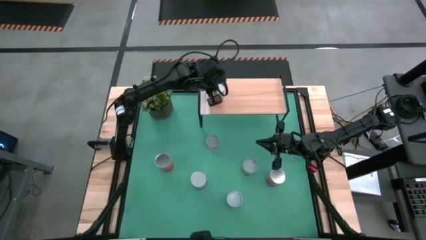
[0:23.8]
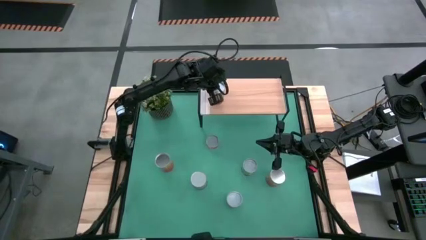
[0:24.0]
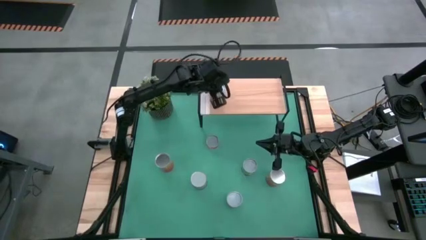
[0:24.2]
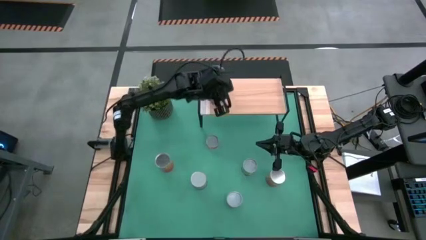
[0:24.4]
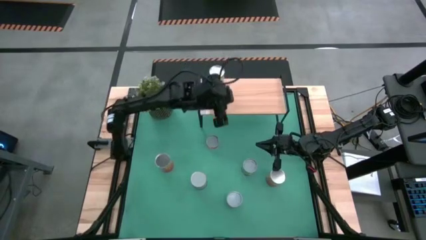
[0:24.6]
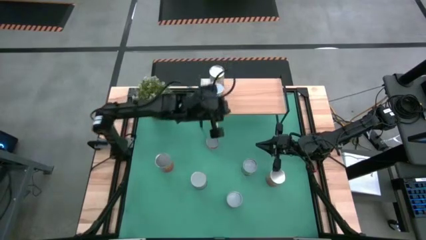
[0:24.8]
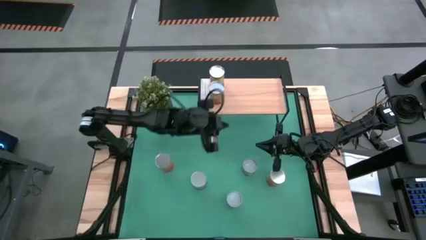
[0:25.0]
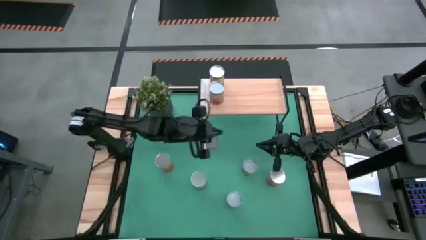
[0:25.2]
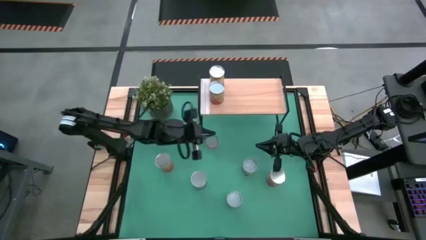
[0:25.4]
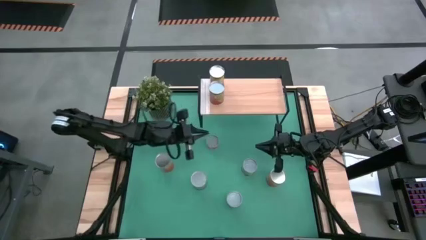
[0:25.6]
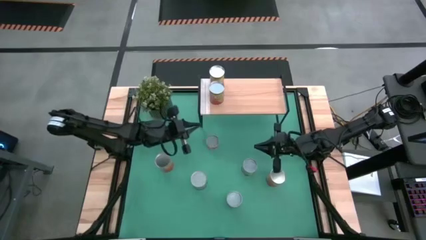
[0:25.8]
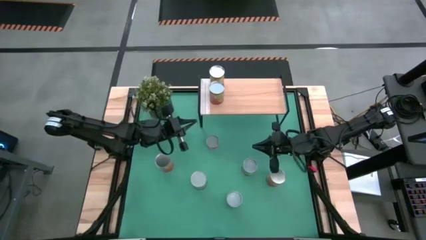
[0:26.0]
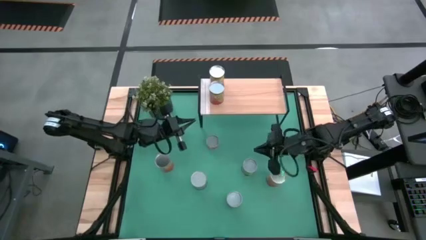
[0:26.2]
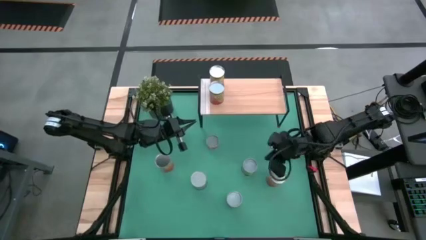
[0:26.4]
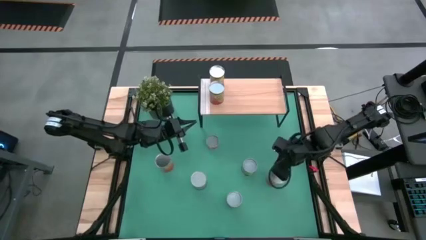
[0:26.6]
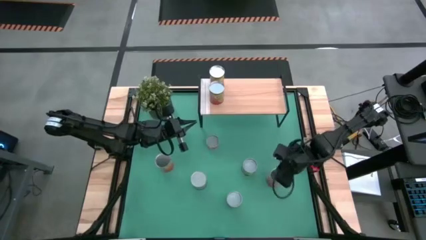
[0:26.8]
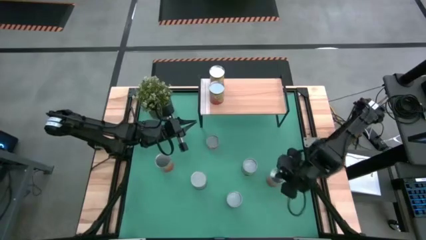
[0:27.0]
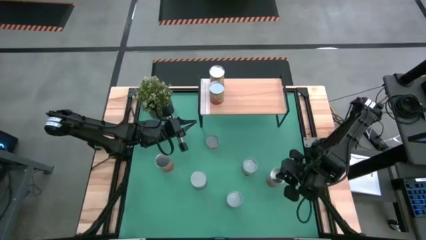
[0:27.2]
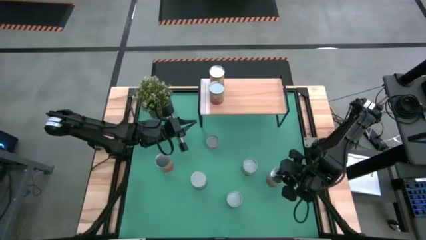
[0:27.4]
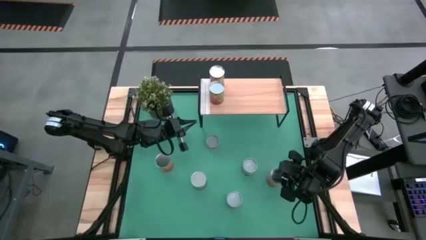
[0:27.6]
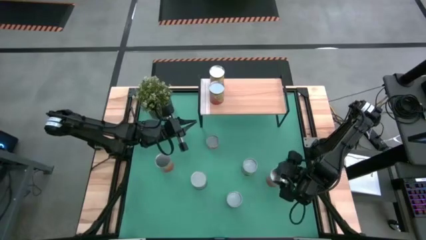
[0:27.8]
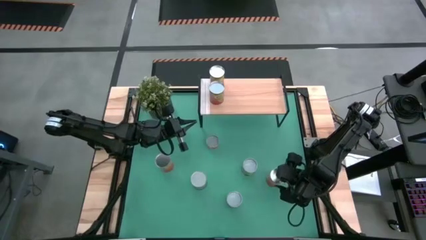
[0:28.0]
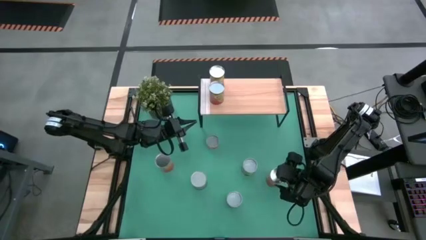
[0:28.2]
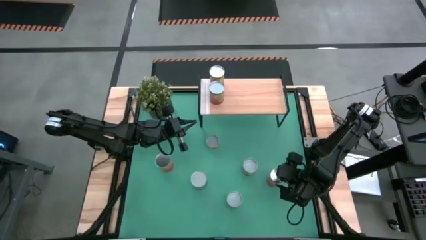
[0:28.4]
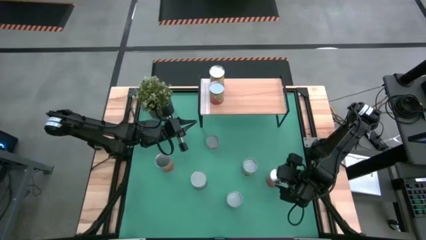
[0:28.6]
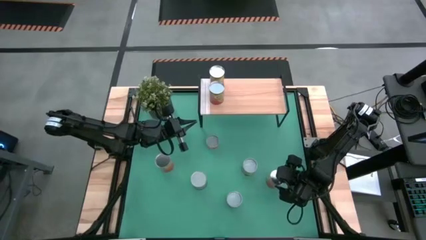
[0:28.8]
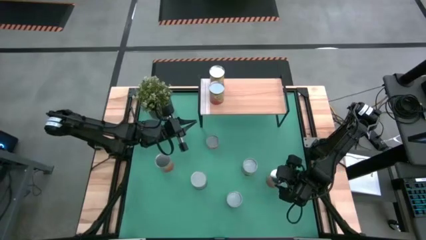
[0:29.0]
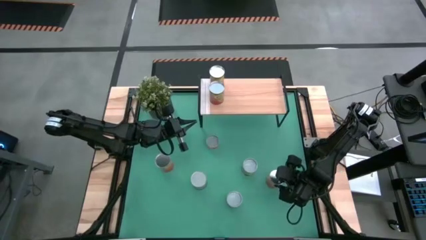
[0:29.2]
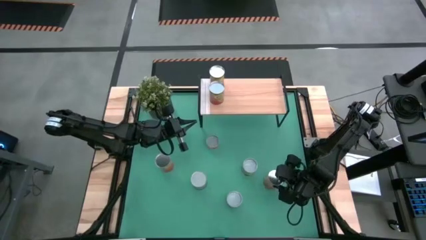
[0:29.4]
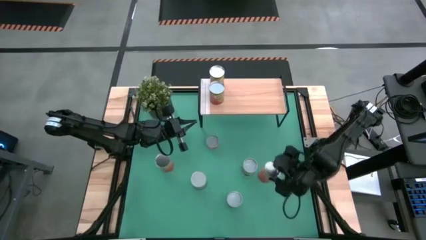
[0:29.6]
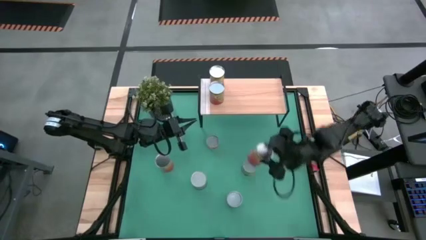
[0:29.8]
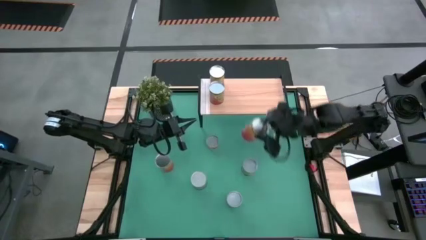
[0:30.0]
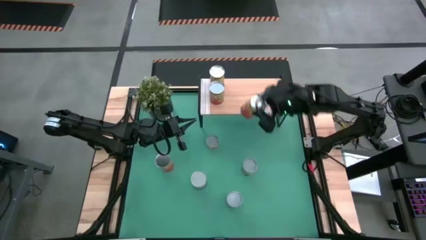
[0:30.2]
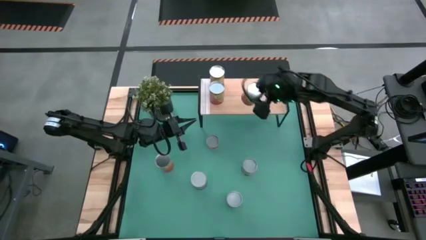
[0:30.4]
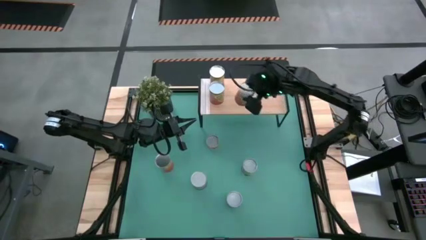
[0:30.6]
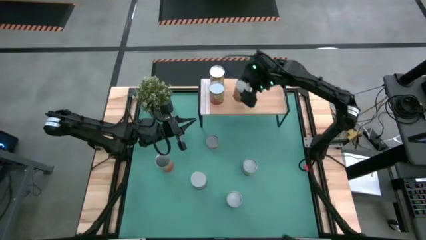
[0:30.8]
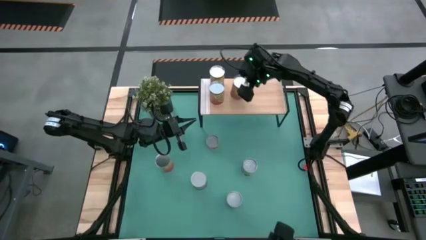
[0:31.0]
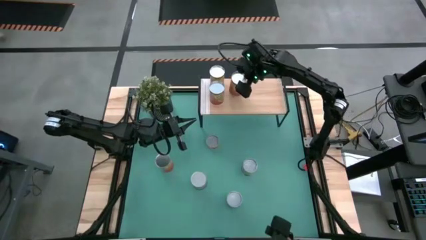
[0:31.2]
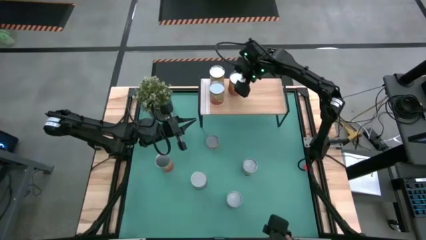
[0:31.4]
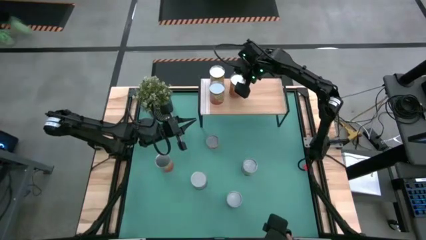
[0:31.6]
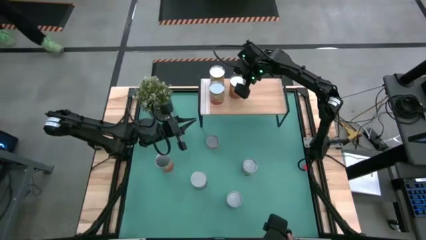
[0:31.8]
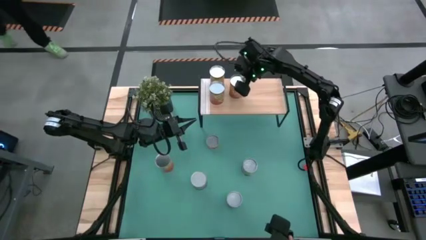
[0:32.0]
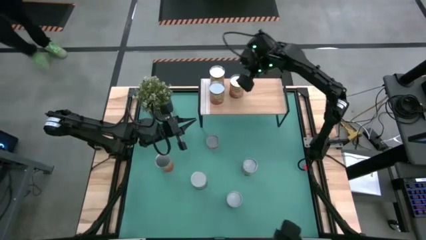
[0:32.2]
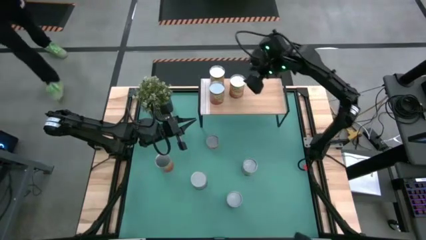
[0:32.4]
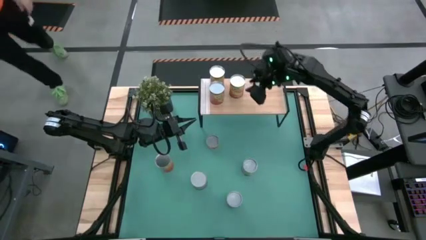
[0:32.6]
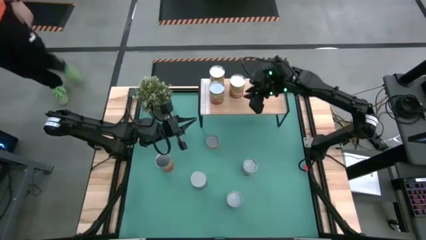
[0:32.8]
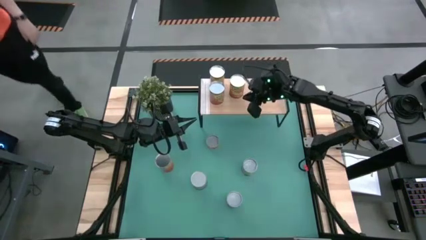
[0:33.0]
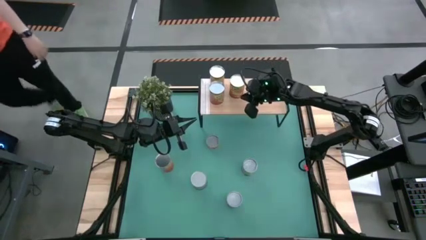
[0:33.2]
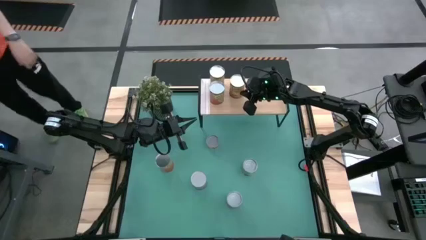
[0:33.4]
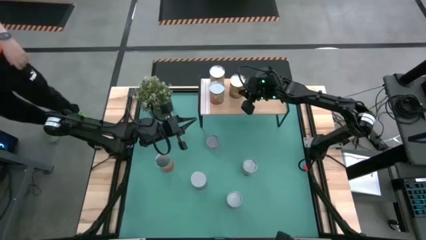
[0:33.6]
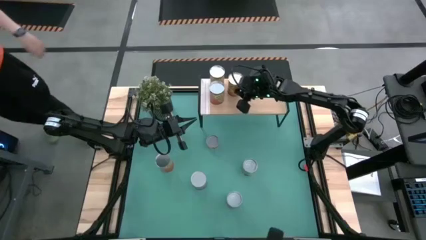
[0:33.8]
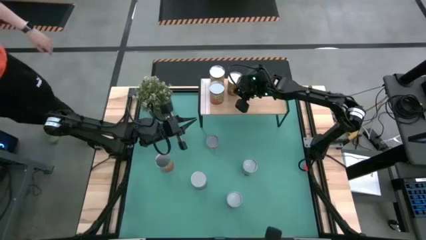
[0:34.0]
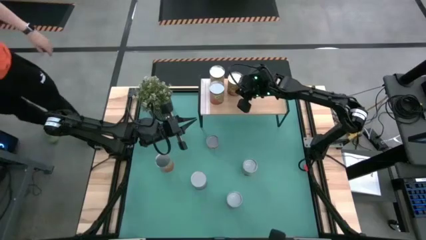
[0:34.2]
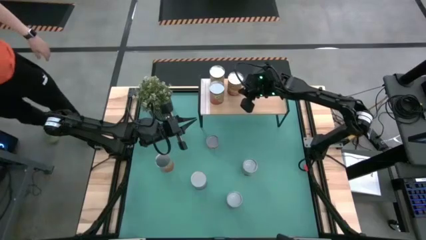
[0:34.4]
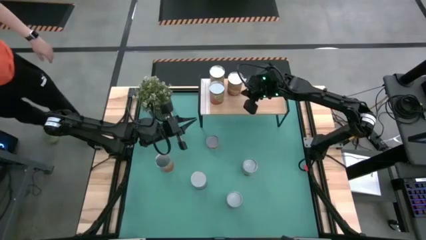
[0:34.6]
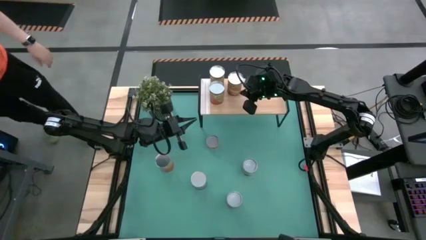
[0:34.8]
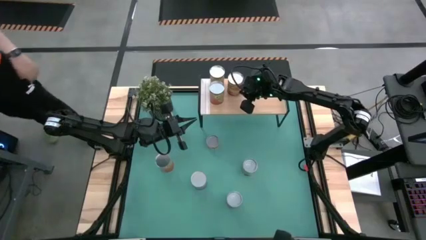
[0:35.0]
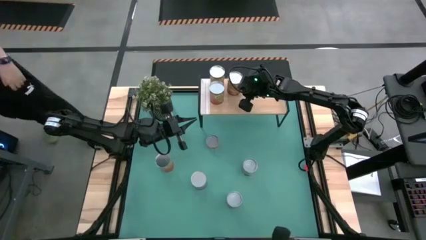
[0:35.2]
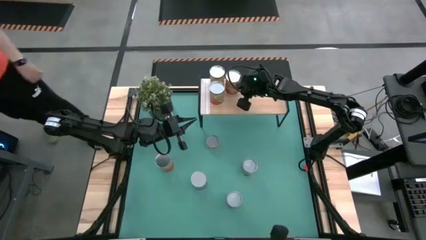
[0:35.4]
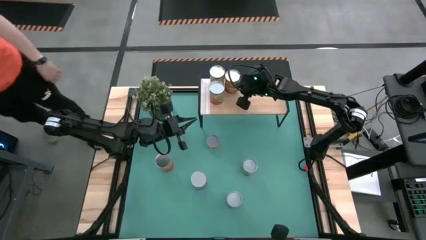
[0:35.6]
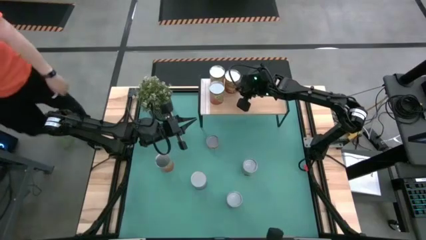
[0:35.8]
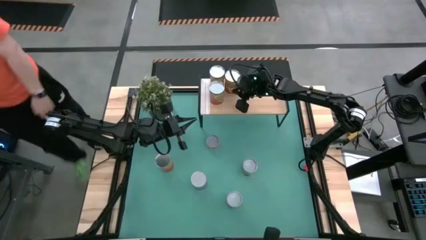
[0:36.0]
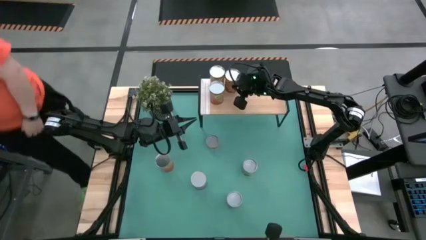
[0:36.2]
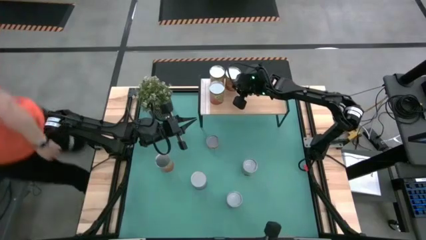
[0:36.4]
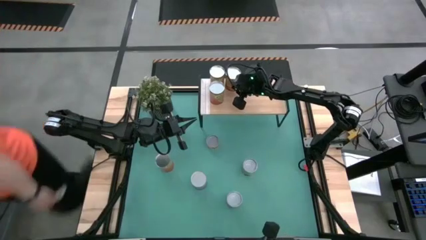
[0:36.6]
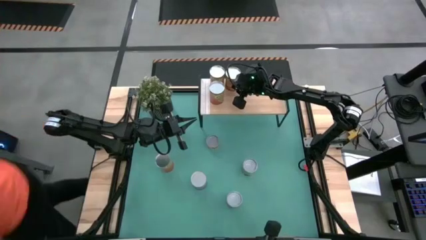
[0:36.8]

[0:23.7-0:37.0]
Task: Pick and place cans onto a shelf
Put the canned corn on the shelf
